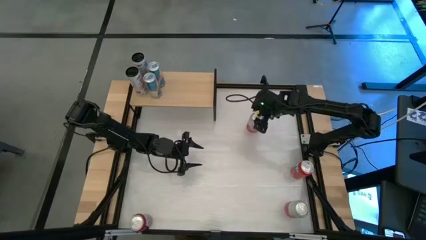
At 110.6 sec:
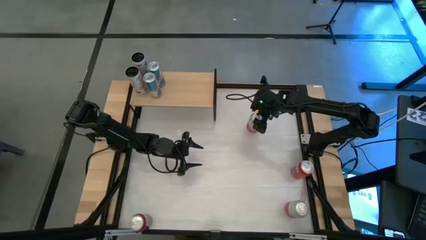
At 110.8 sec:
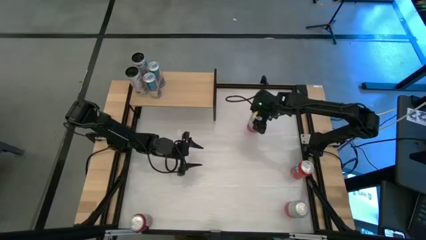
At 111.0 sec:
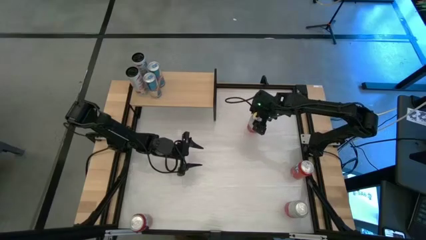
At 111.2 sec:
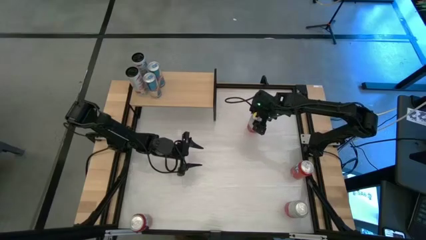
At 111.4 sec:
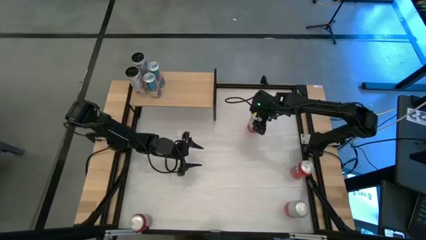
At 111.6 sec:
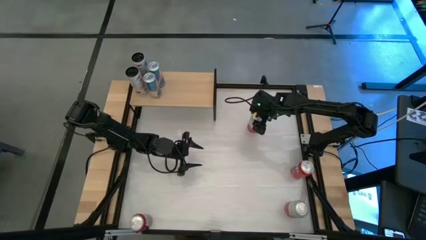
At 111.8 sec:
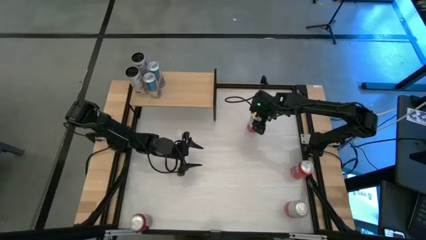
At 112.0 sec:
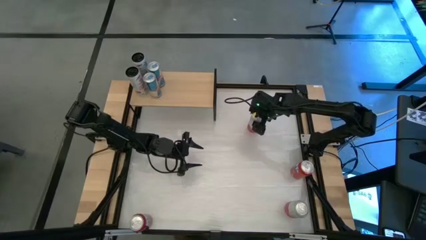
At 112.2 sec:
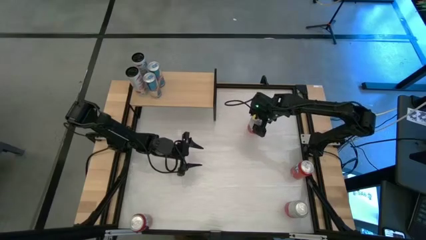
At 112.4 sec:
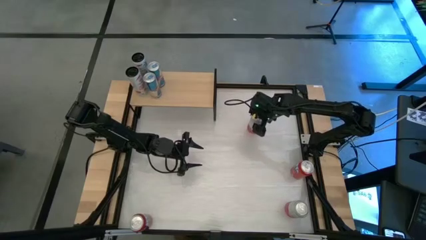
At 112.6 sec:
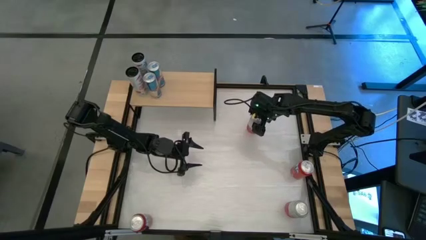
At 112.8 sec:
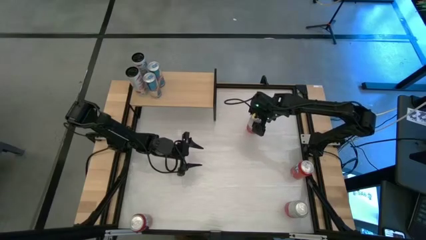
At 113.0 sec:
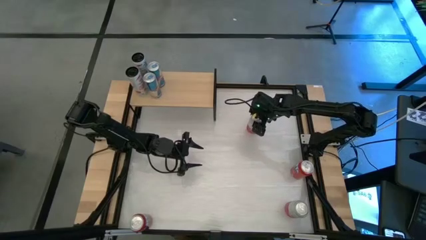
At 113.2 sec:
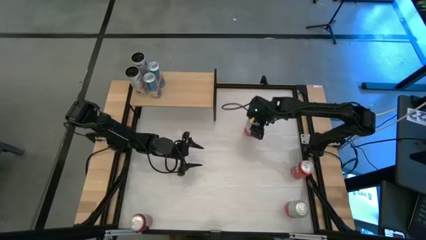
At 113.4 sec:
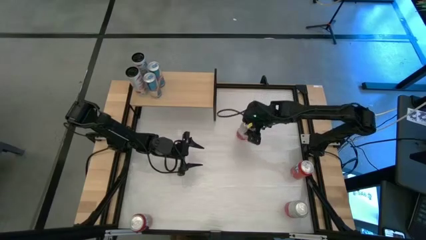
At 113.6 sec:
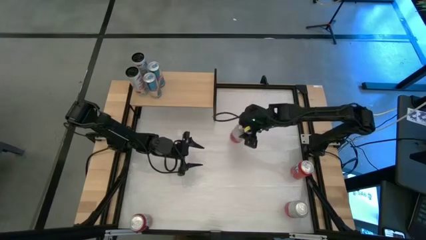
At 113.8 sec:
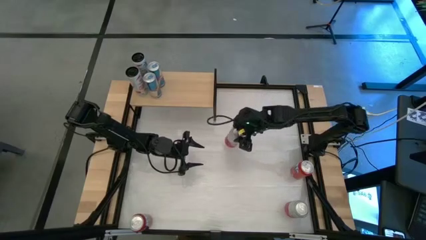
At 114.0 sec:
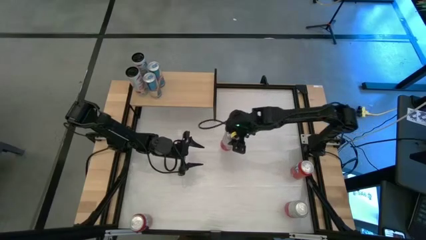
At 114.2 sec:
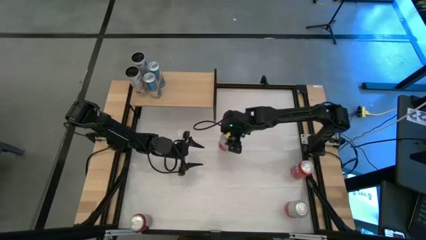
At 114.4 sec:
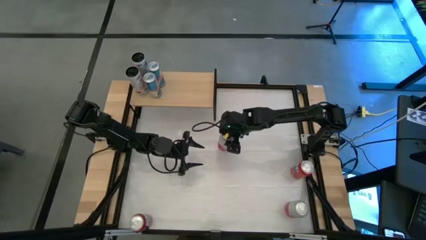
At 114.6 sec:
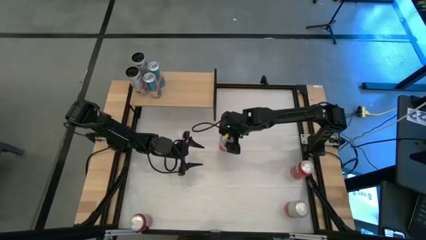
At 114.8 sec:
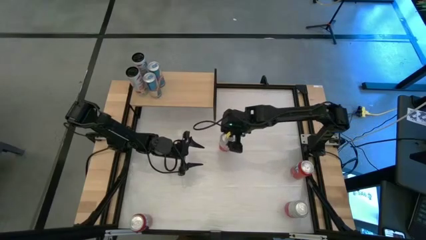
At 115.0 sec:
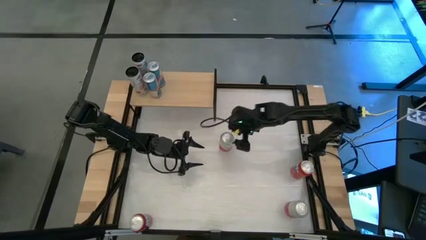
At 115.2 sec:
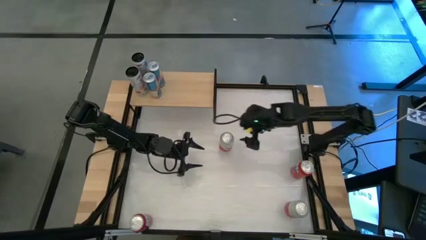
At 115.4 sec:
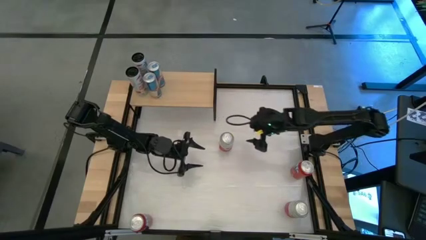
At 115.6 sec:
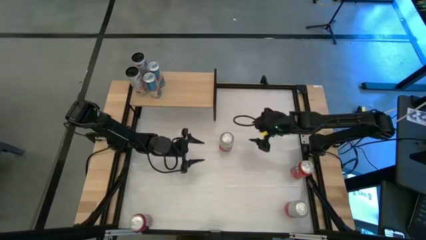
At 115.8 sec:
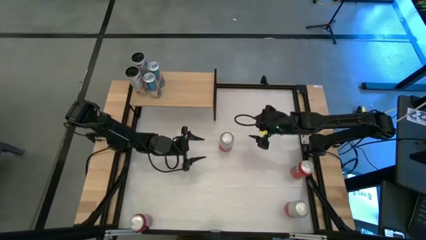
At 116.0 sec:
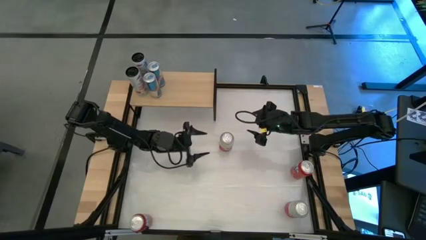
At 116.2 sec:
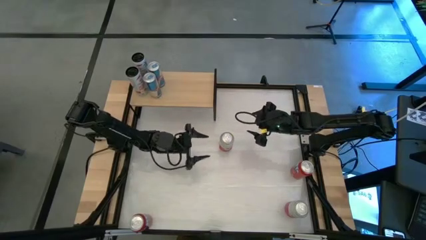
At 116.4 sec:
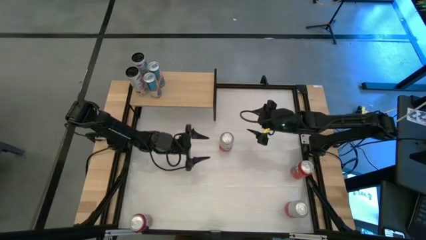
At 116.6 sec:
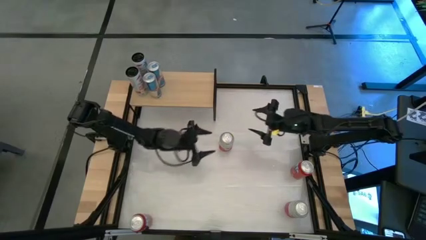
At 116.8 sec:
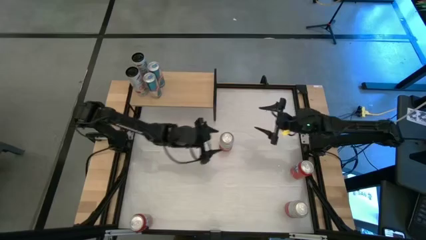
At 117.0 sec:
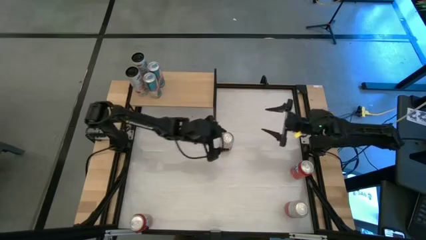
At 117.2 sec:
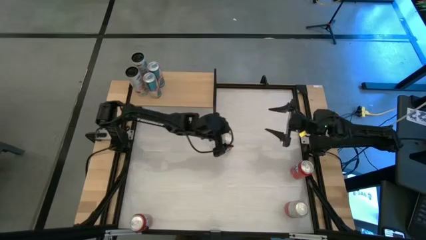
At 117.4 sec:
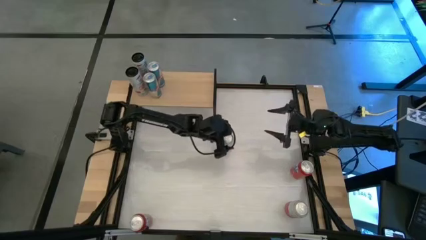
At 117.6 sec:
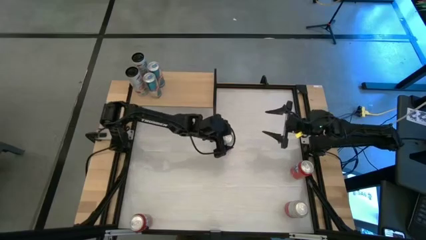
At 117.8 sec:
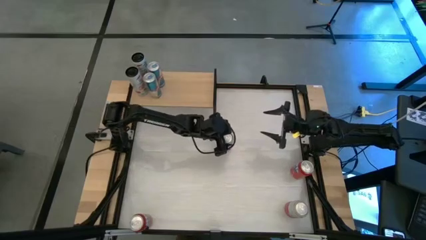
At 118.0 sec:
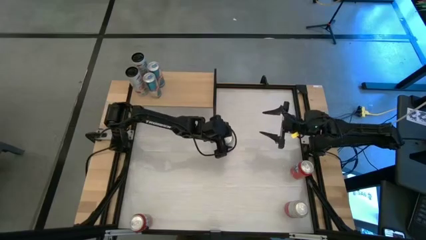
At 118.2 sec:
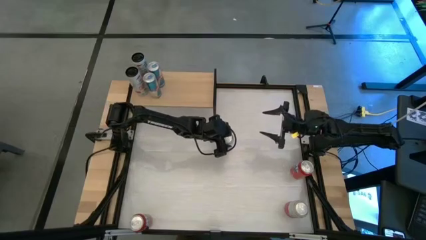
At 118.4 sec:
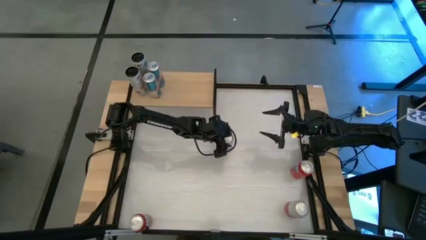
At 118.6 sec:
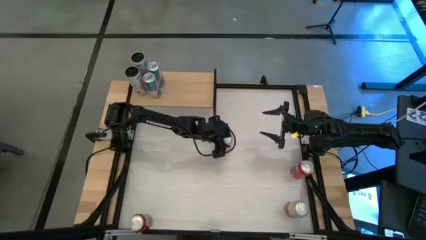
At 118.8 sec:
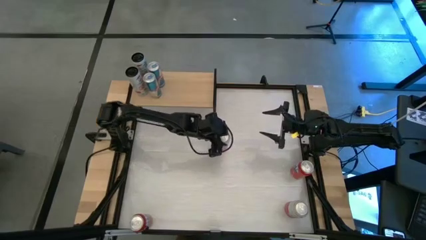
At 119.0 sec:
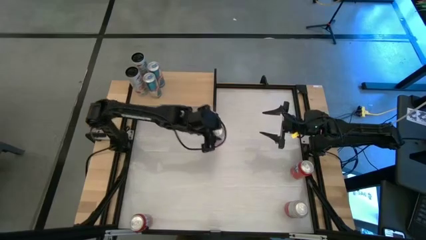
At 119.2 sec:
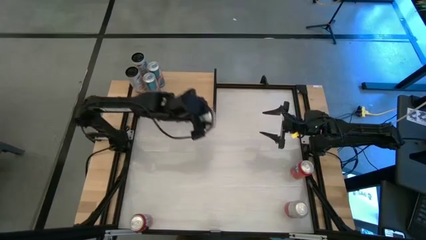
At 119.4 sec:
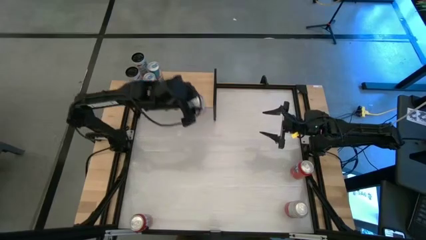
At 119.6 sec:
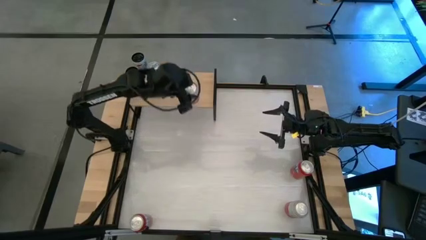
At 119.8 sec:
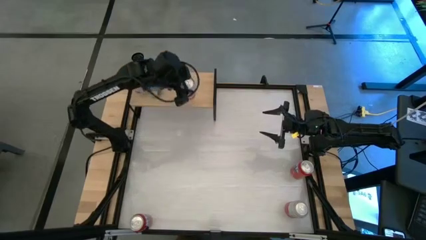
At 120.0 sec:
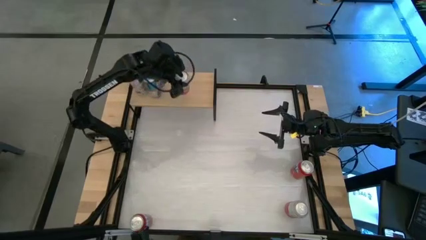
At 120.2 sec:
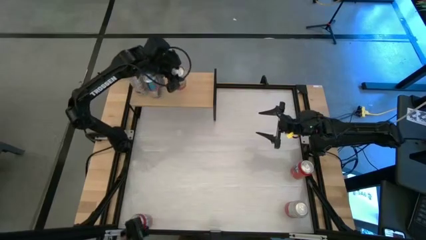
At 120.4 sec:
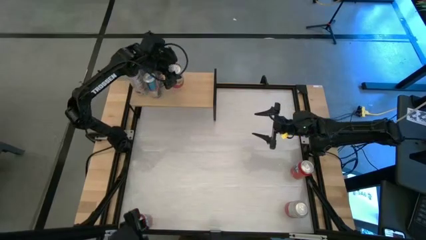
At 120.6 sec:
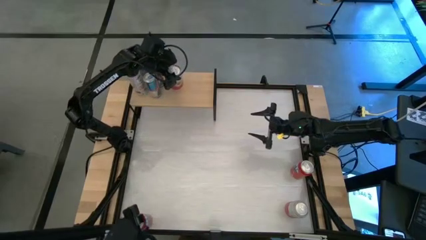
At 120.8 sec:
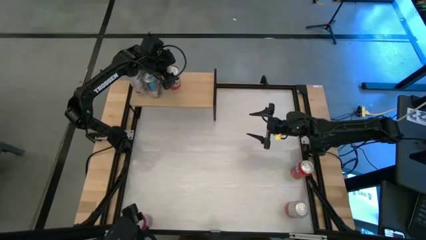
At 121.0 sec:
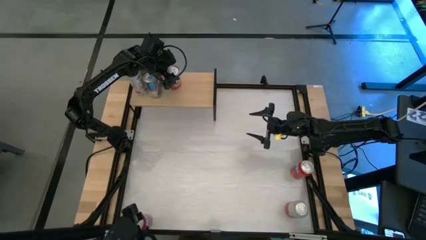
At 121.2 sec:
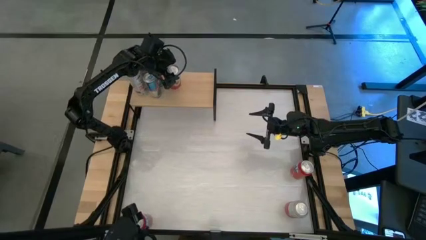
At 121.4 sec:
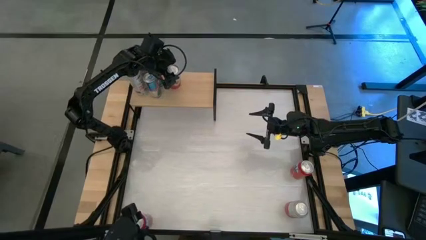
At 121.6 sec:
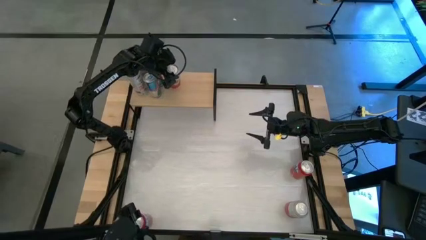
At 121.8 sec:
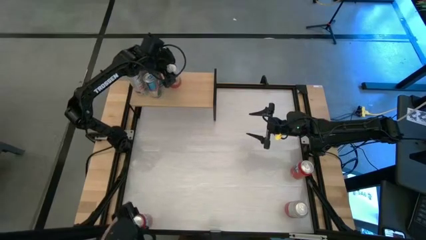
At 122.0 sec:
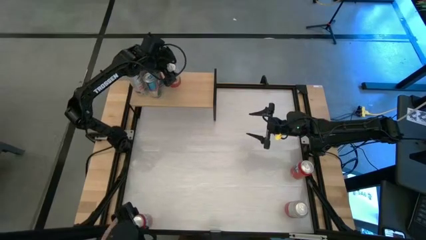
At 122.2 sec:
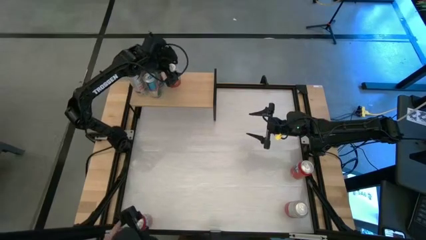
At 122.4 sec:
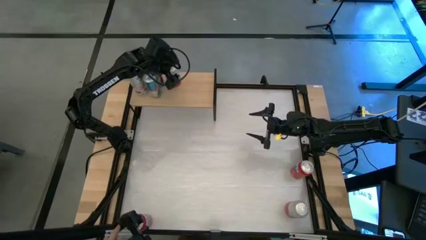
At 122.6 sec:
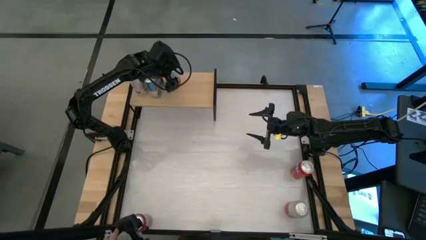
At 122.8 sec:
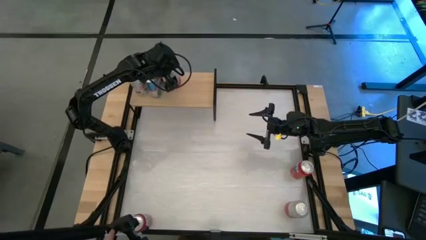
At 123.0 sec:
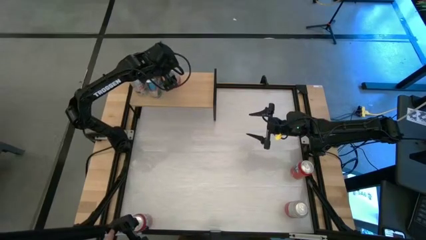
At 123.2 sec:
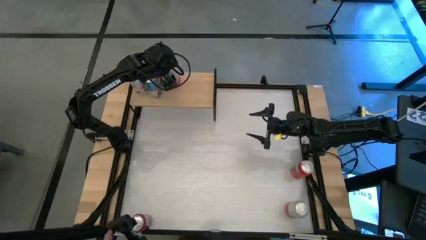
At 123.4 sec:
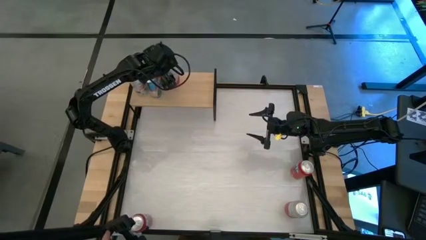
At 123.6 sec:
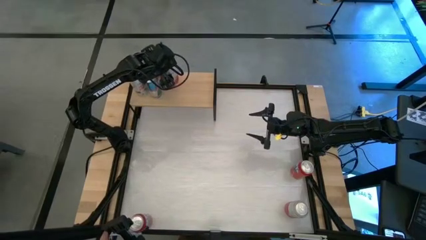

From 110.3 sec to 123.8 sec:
Task: Place canned beverage on shelf
Put the top pink white soda can on the shelf

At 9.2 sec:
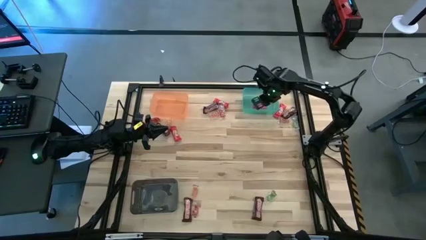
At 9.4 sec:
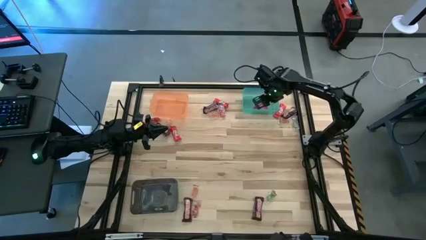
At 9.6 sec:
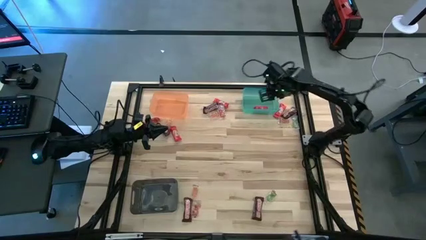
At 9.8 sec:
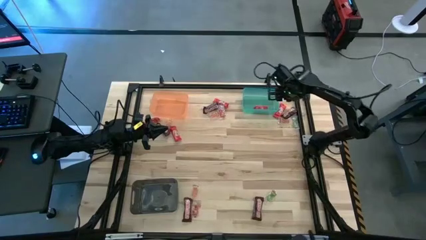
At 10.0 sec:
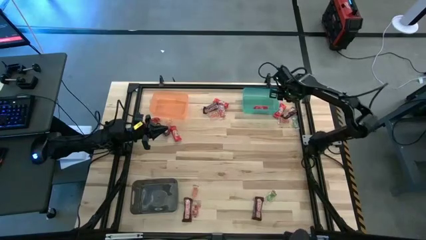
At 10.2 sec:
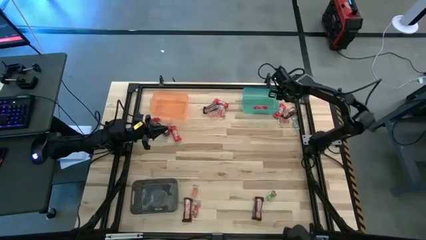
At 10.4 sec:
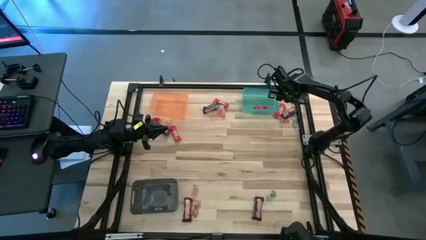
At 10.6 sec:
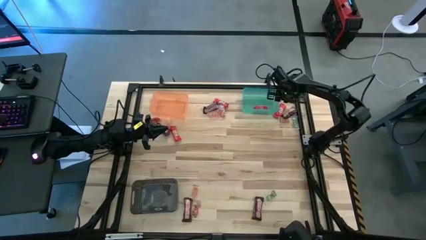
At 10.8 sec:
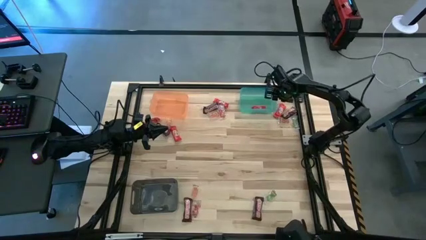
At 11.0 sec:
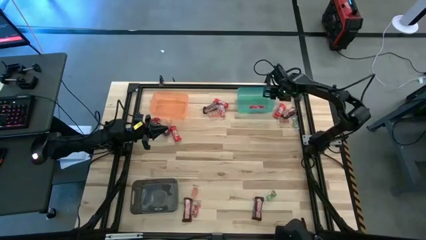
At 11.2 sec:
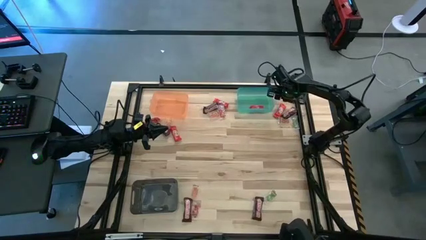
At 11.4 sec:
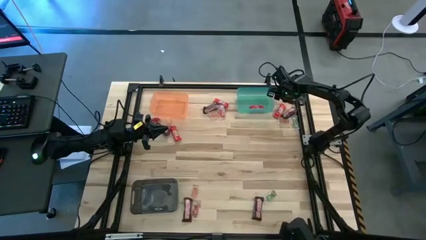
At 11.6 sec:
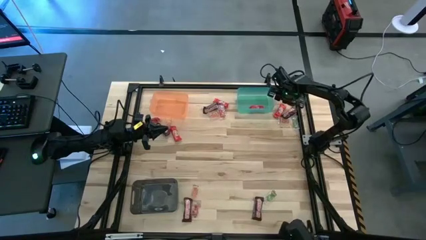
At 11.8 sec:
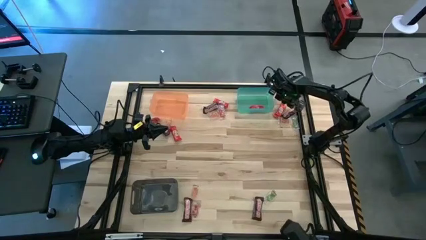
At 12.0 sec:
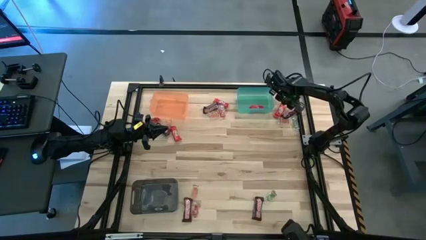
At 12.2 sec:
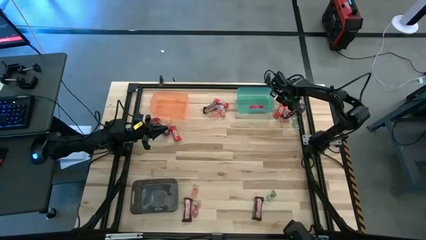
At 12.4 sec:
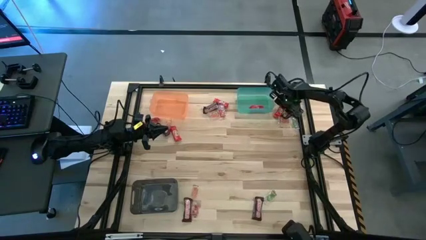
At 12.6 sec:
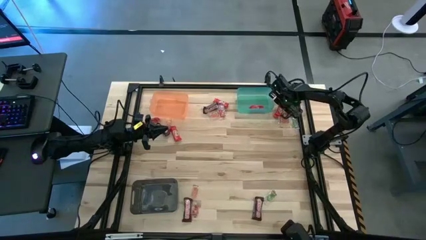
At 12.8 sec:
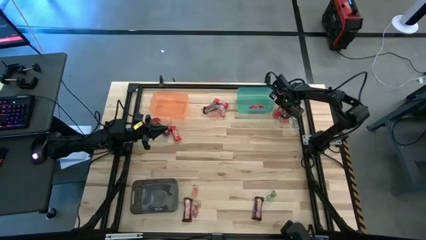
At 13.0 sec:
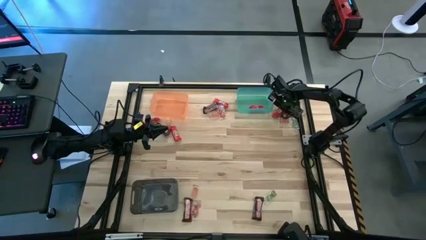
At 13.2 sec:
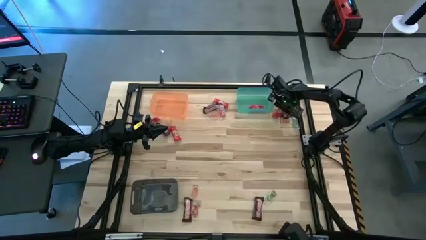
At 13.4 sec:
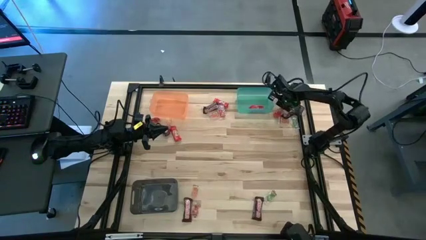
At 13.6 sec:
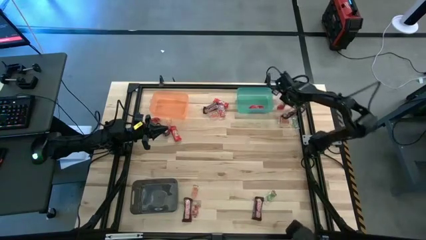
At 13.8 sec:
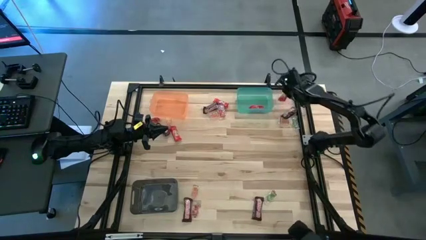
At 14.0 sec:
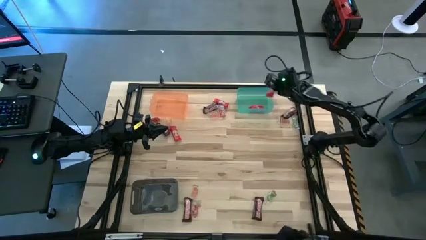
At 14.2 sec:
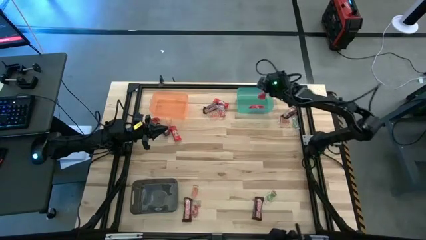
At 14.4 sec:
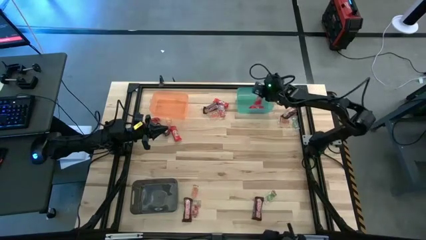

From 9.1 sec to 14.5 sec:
Task: Sort candy by brand, put in halloween buckets
Put the red chocolate bar into the blue bin
